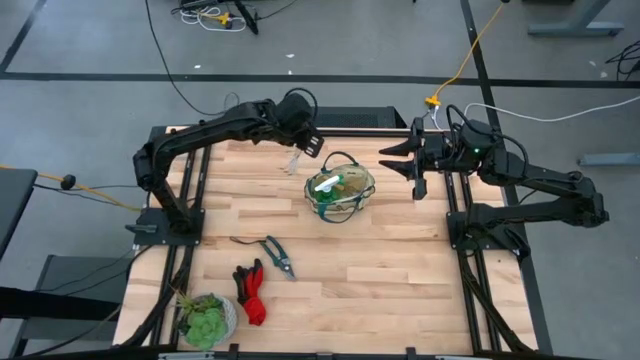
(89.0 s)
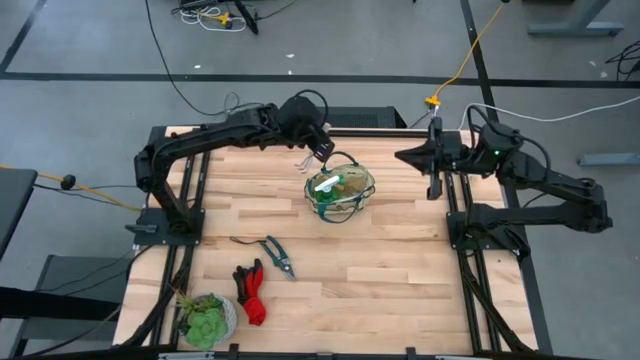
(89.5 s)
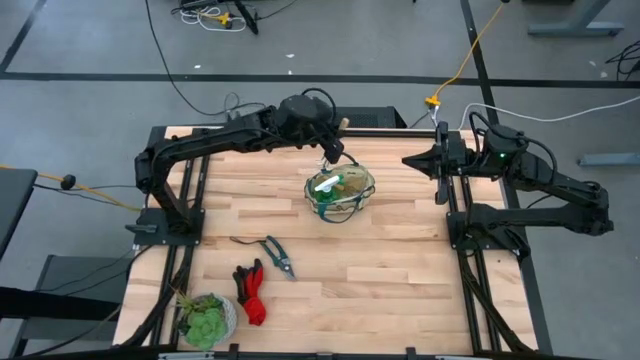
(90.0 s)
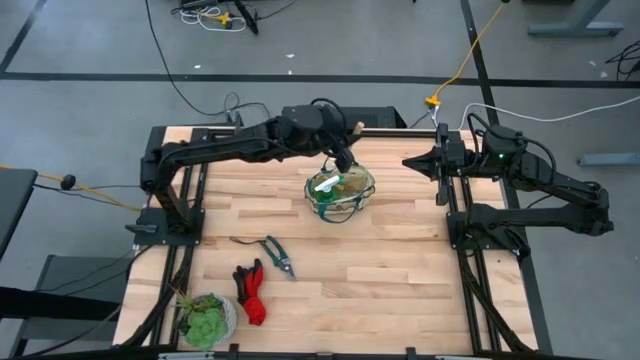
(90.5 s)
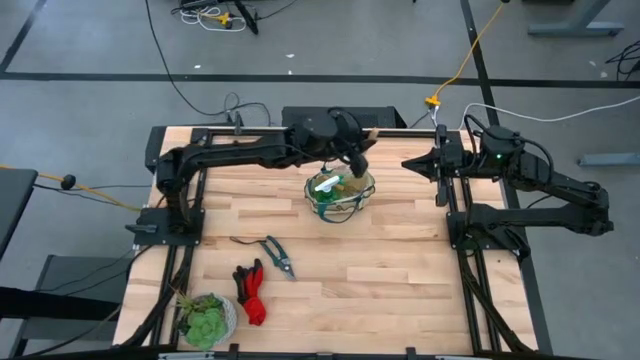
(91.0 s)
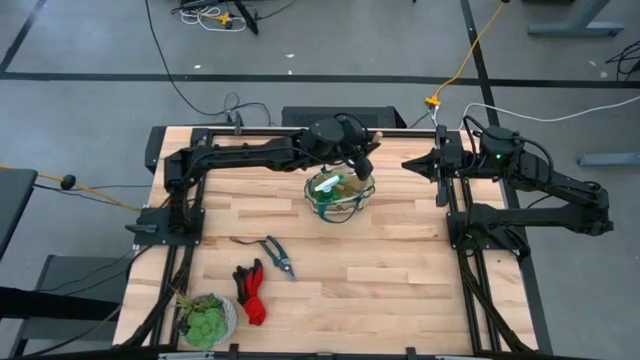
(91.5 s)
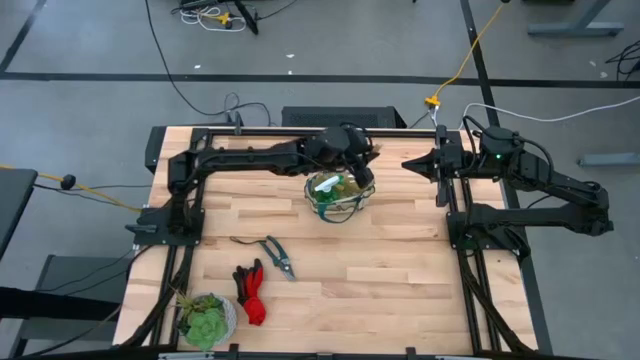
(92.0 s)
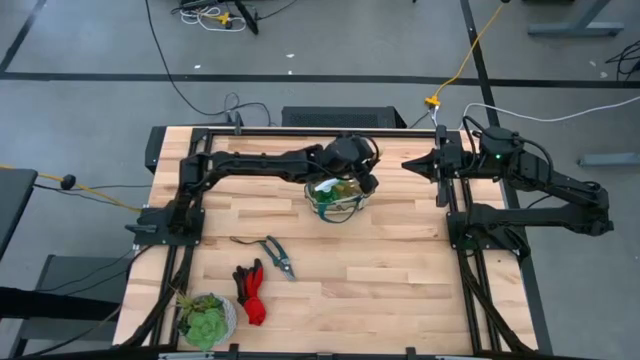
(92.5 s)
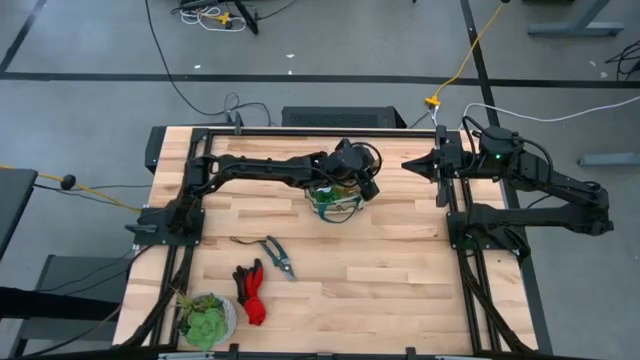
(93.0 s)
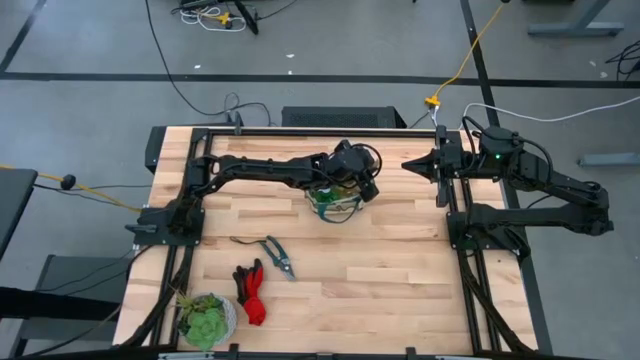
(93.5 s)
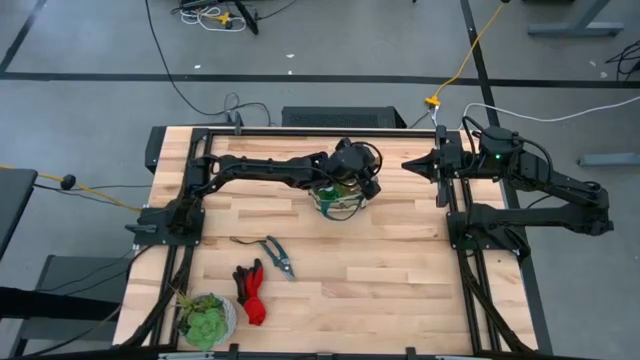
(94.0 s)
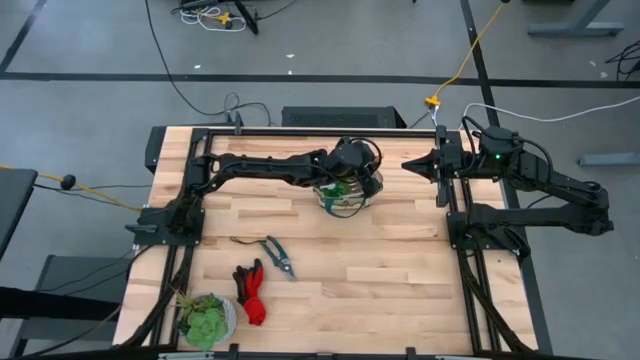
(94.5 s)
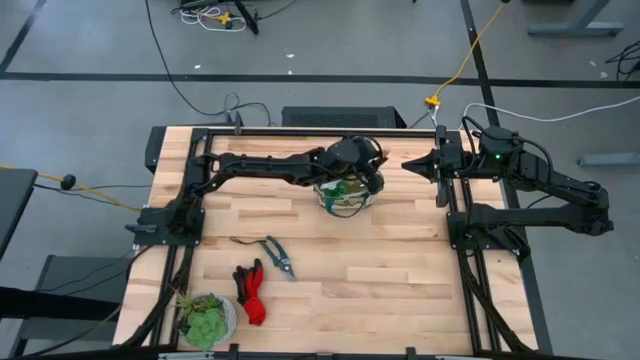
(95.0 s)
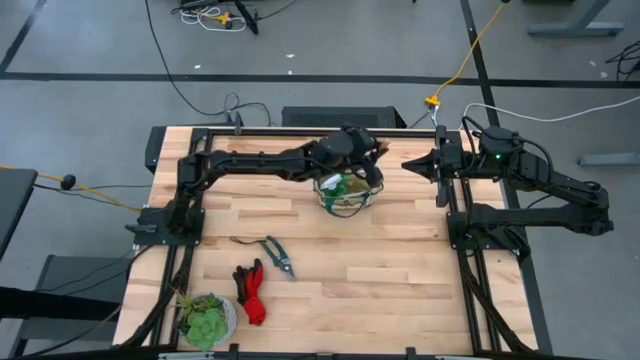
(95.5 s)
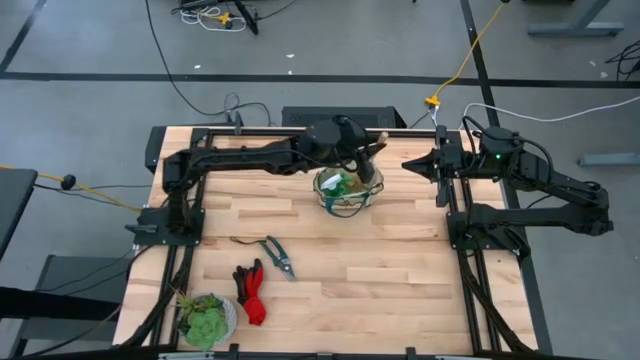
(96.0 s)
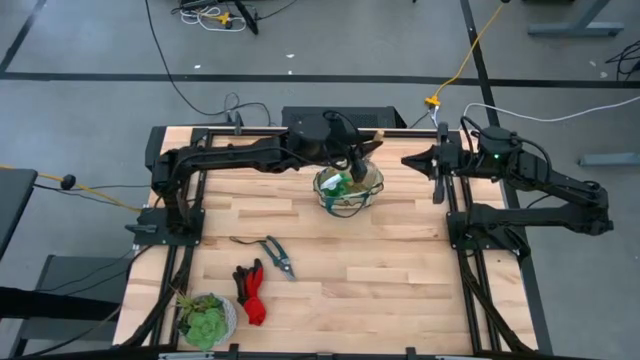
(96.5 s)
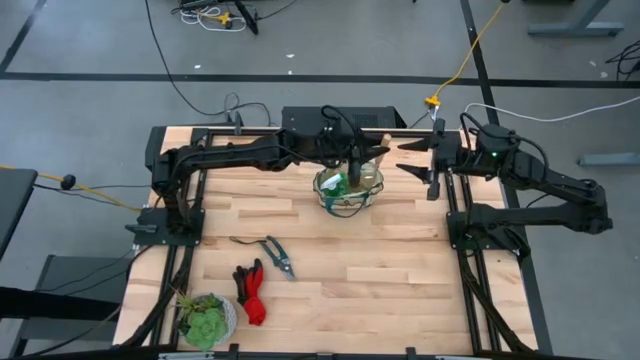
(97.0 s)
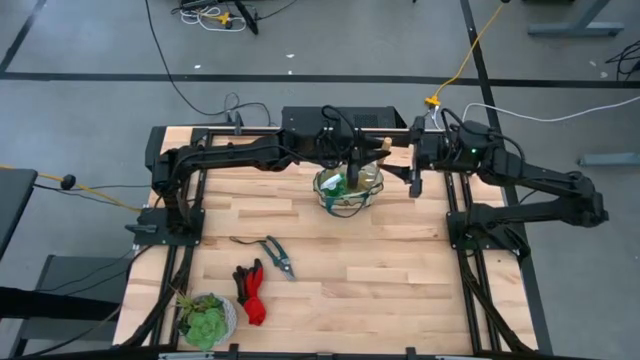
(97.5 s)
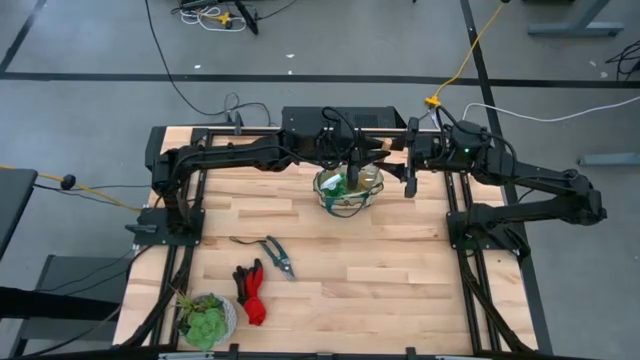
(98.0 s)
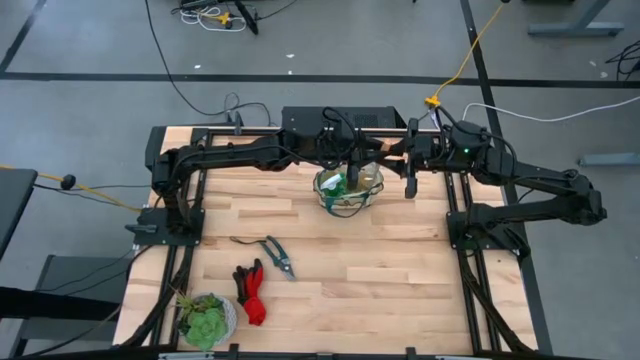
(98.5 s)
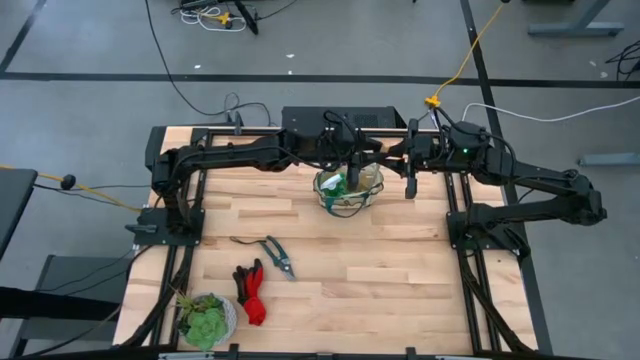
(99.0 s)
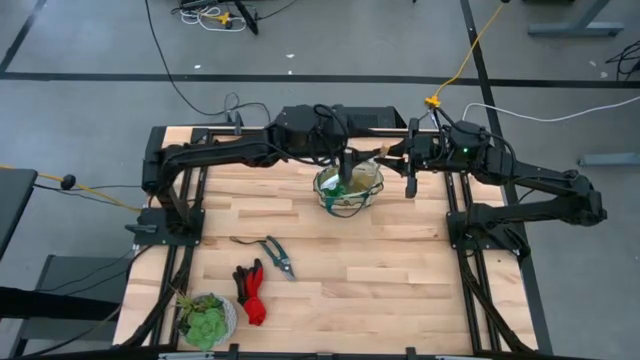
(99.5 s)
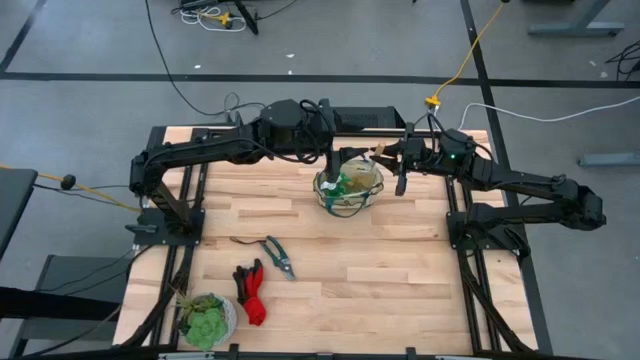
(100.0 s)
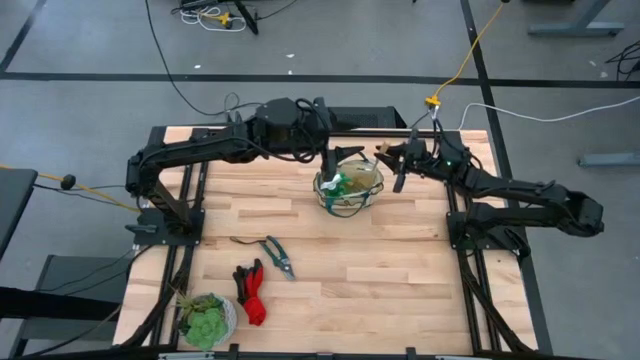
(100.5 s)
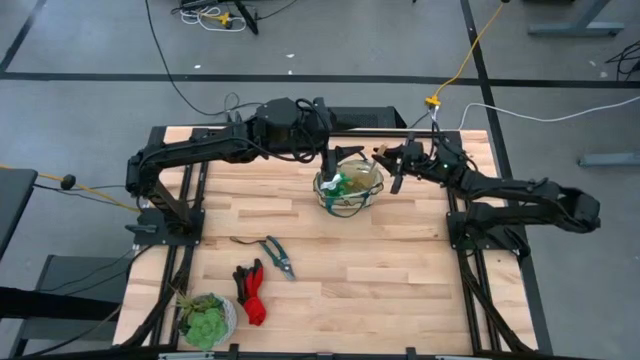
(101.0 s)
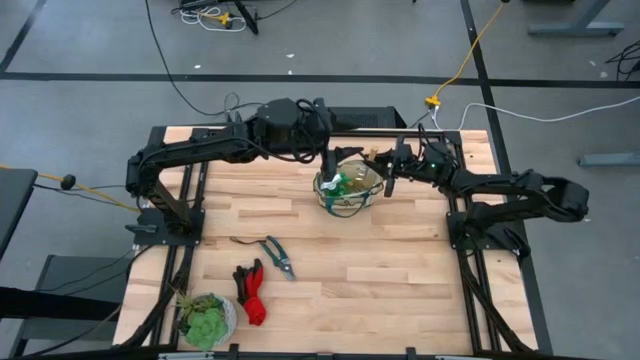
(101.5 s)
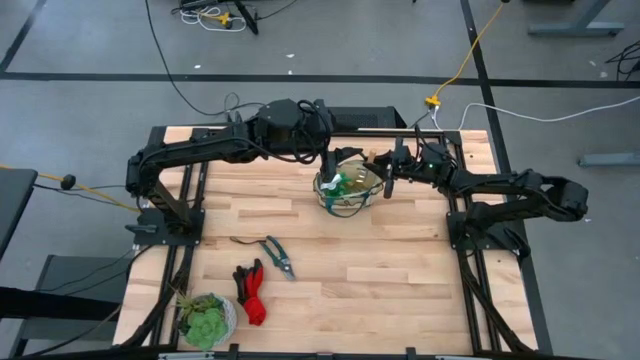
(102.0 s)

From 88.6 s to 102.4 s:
Task: Pick & Place Garden tools in Gardening bag
Put the brown hand rake into the gardening bag

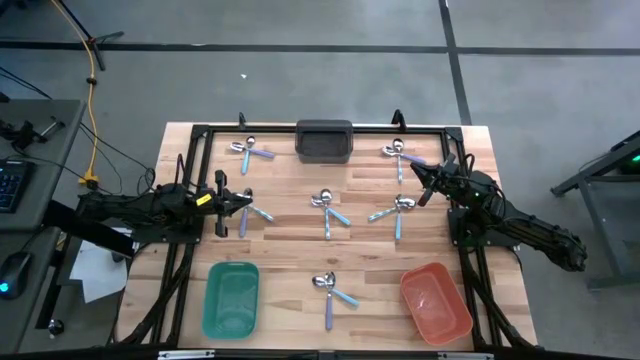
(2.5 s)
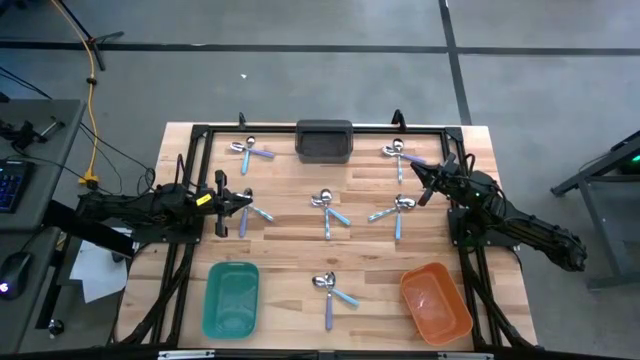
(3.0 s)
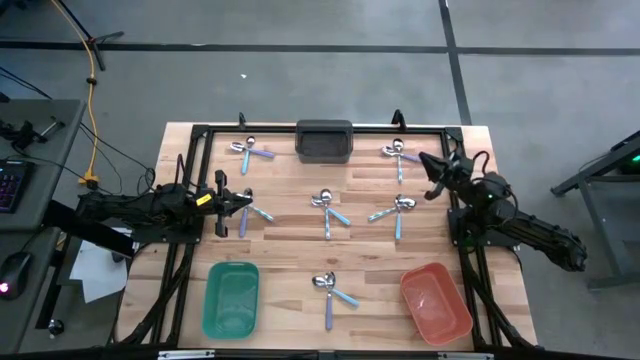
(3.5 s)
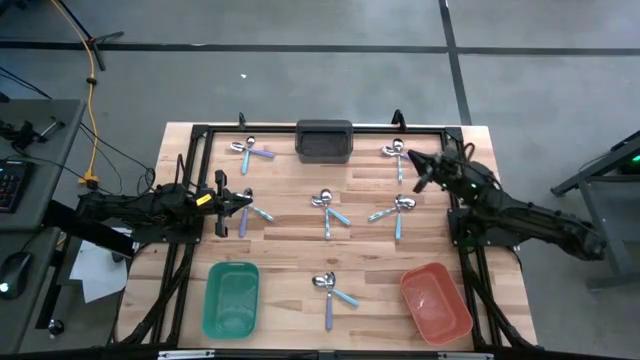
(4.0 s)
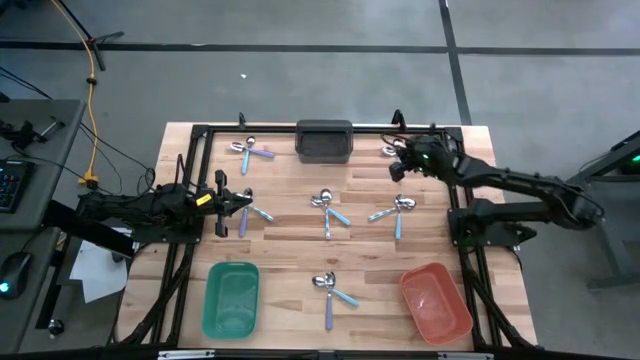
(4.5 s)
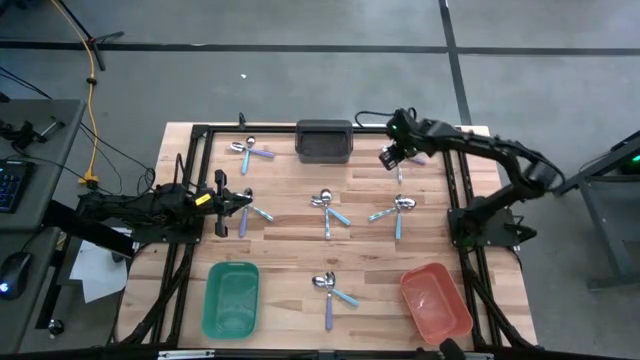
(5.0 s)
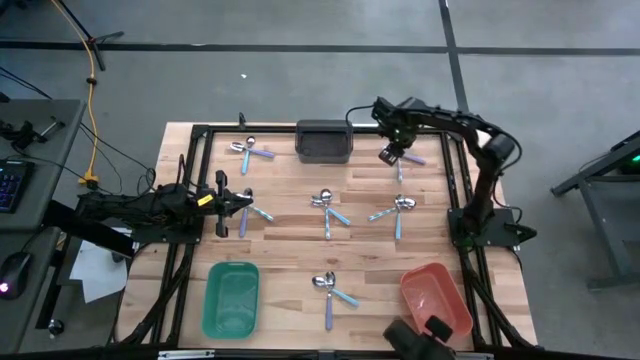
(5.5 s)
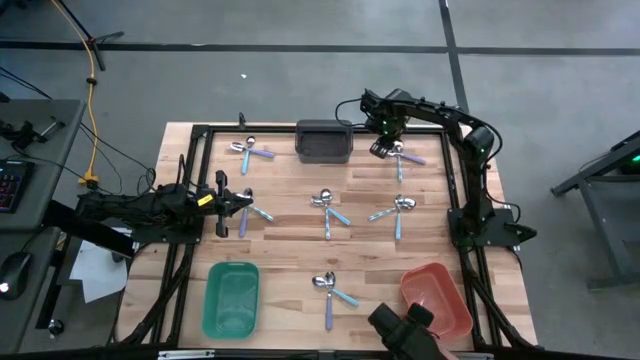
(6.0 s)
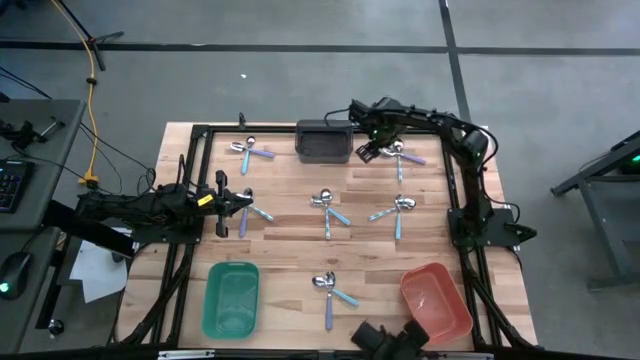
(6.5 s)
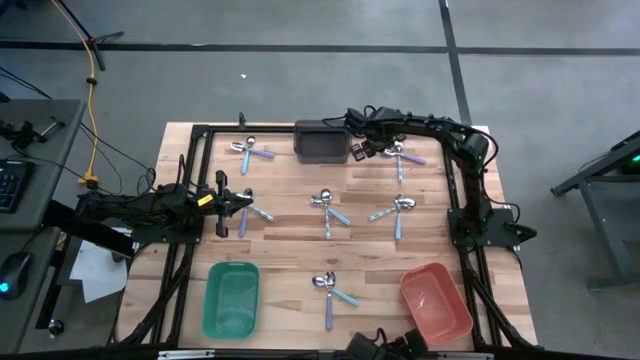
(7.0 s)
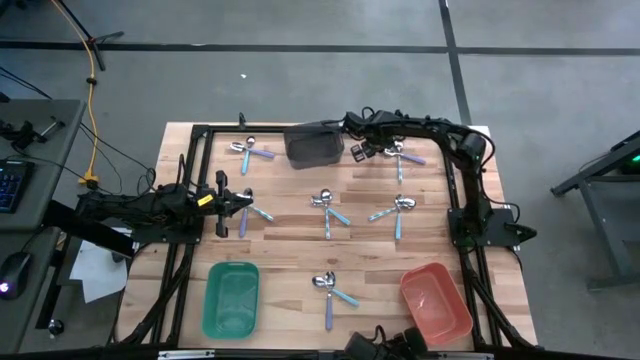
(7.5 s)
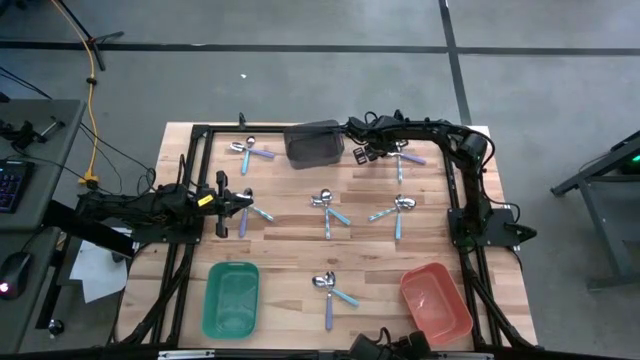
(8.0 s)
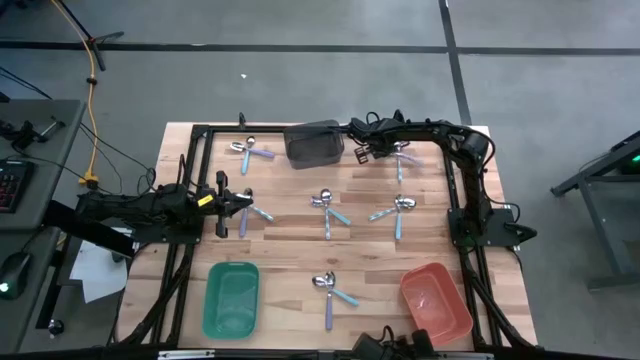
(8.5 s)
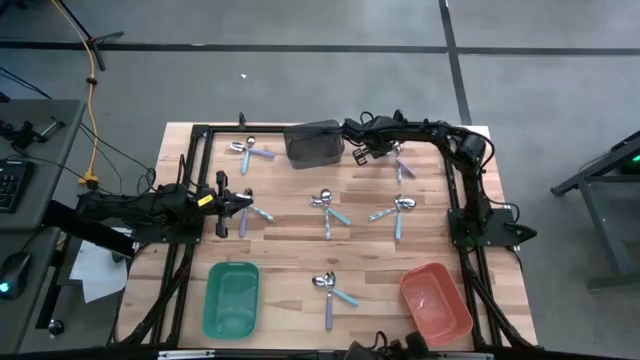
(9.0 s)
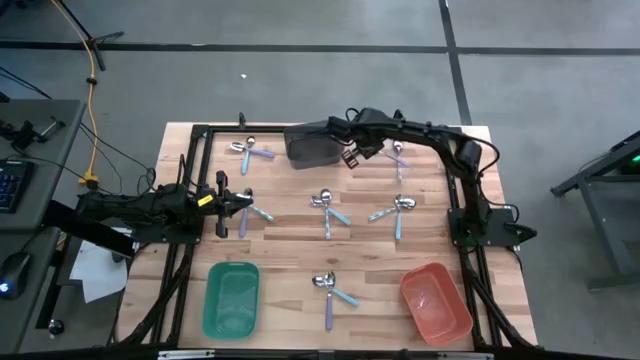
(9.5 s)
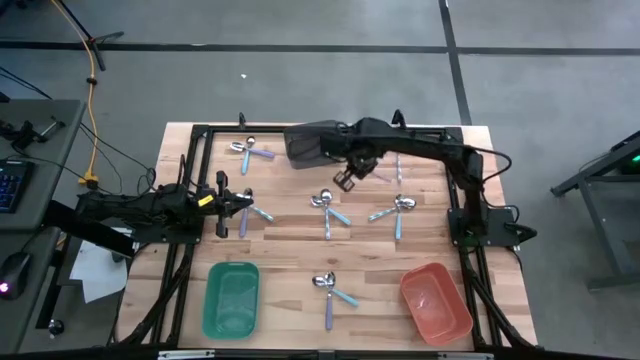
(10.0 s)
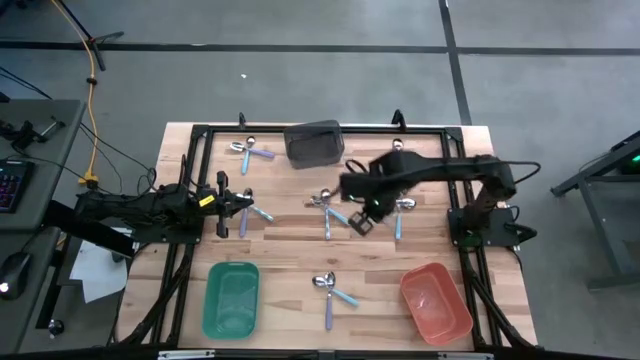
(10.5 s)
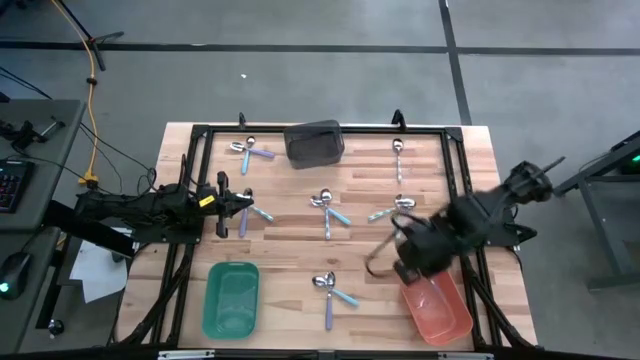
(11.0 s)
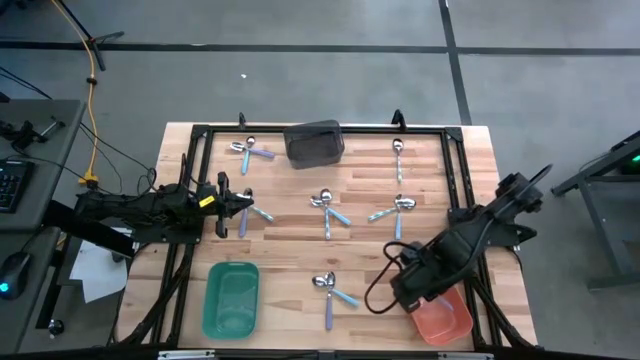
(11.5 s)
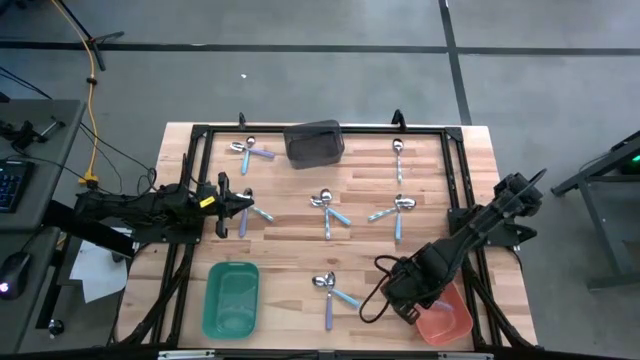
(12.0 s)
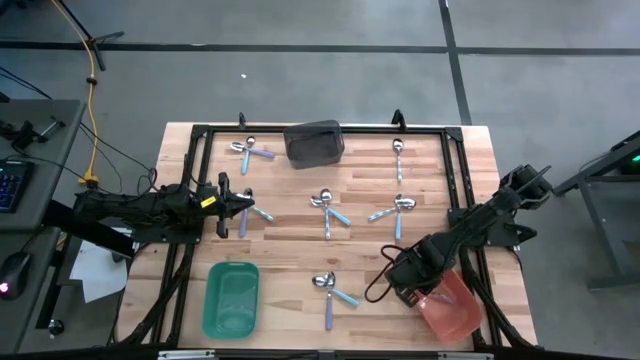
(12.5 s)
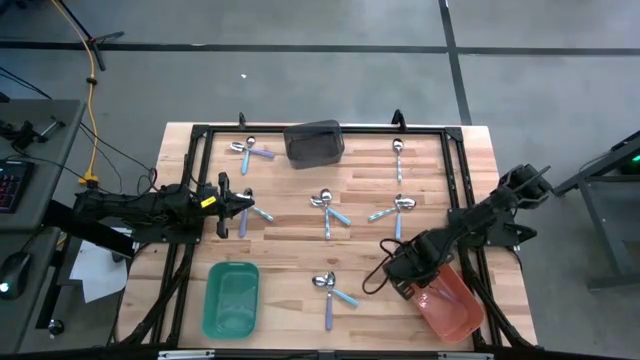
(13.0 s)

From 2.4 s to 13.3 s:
Task: Sort silverware by color (type)
Put the purple spoon into the orange bin
